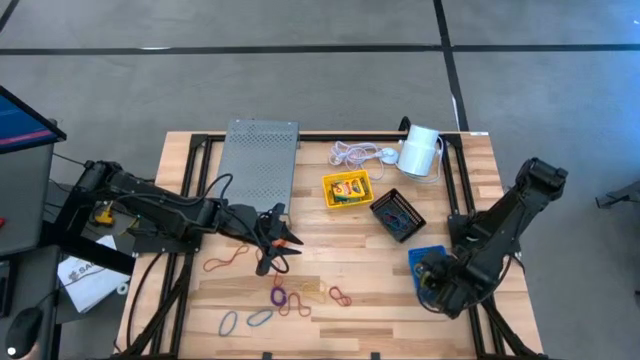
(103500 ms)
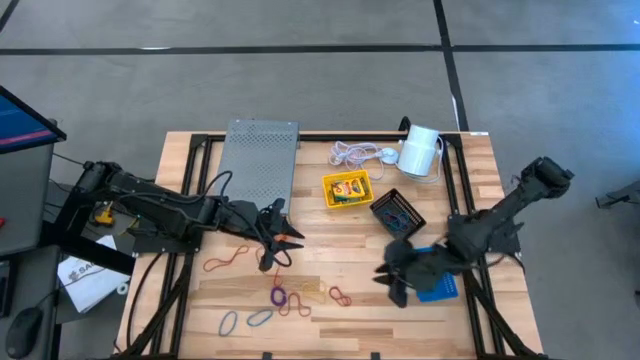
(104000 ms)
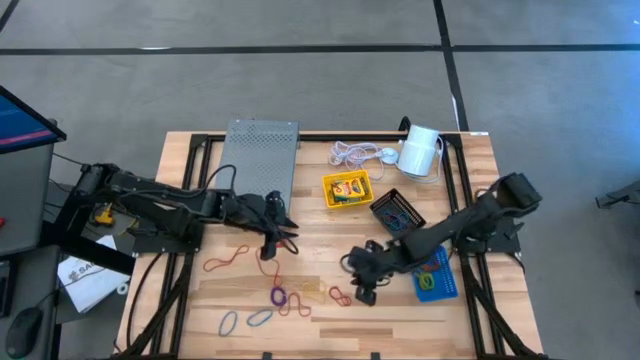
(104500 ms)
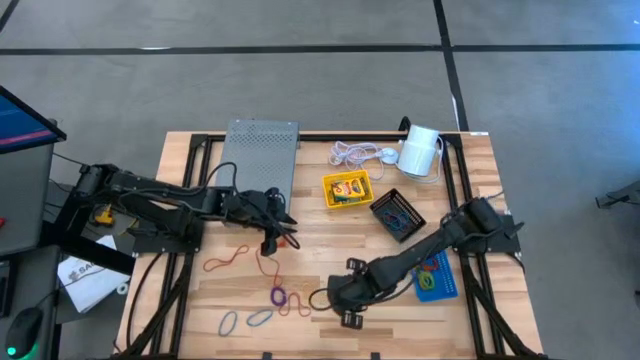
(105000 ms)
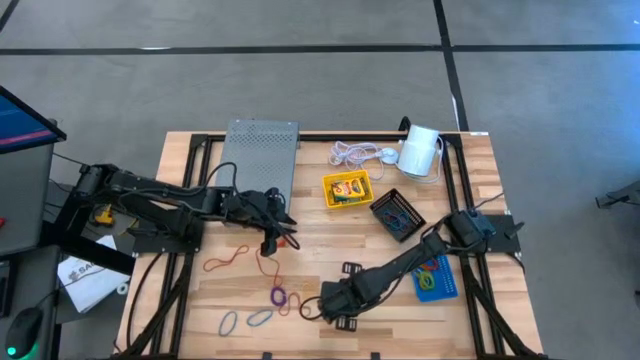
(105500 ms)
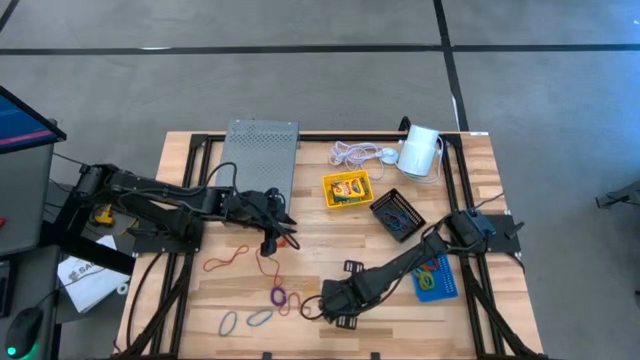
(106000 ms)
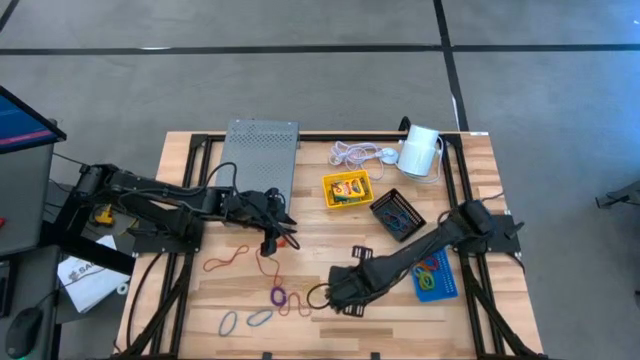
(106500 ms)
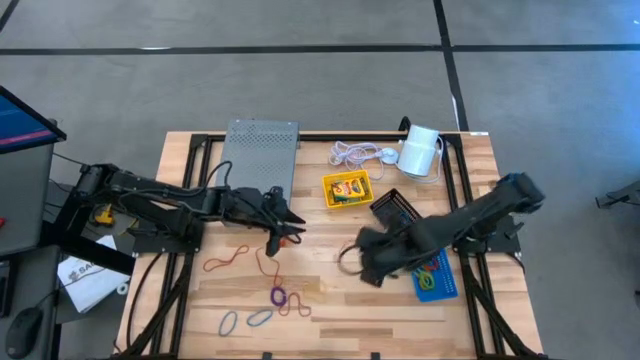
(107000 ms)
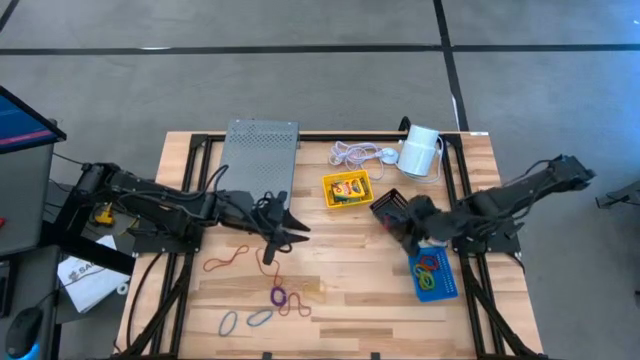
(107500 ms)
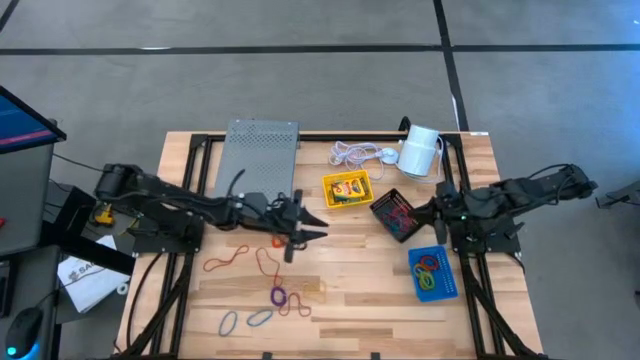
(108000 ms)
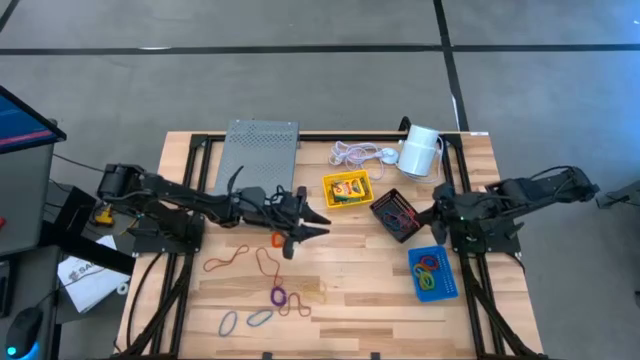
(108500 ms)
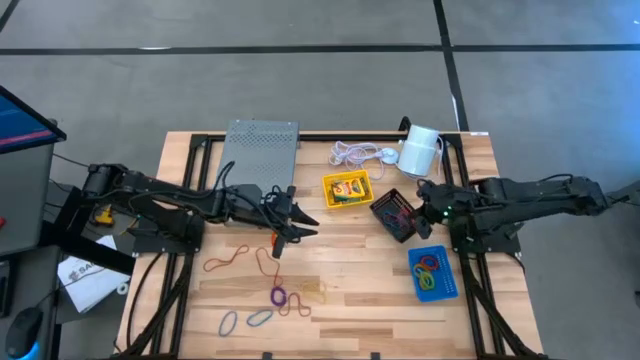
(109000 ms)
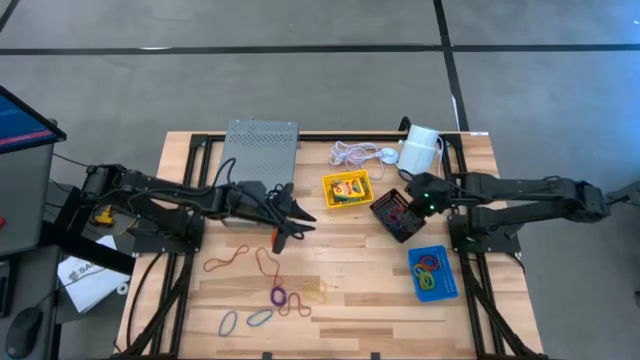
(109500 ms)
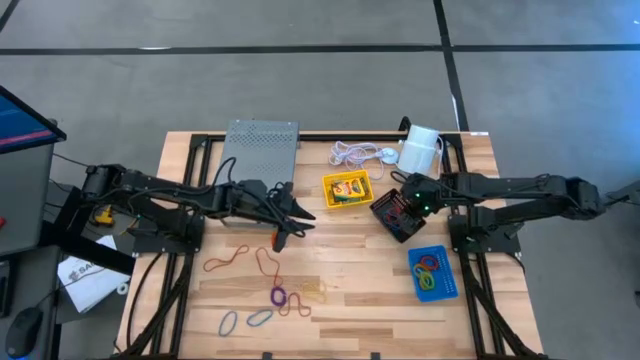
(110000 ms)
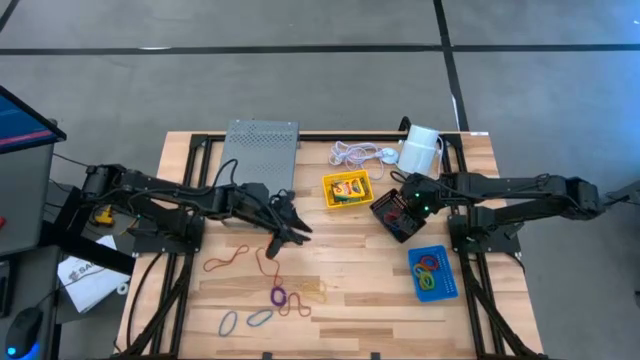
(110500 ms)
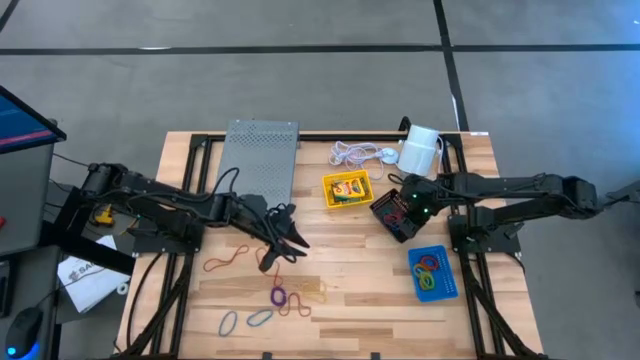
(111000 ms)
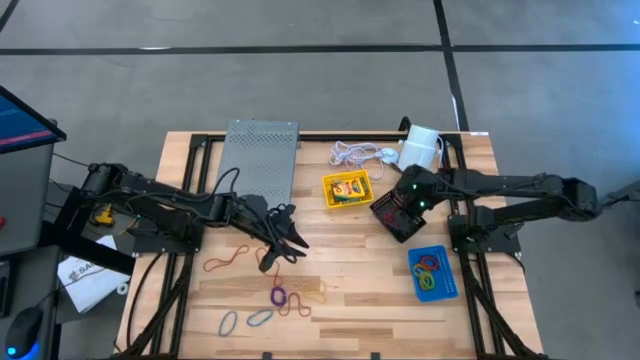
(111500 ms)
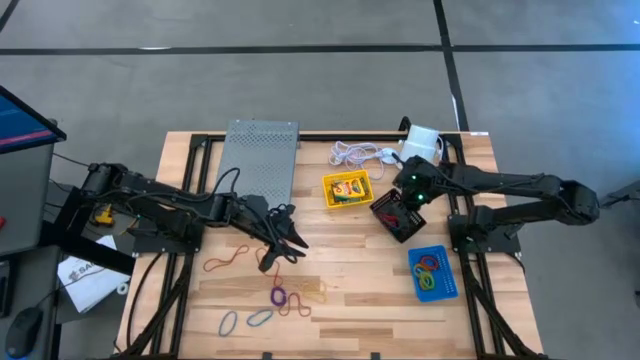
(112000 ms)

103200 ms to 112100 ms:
Task: Pick & Place Office Desk Supplies
Put the red rubber band into the black bin

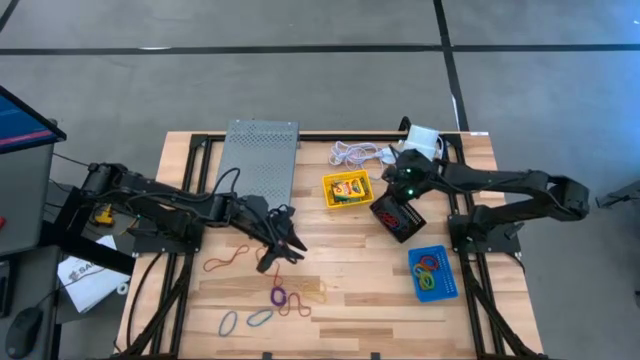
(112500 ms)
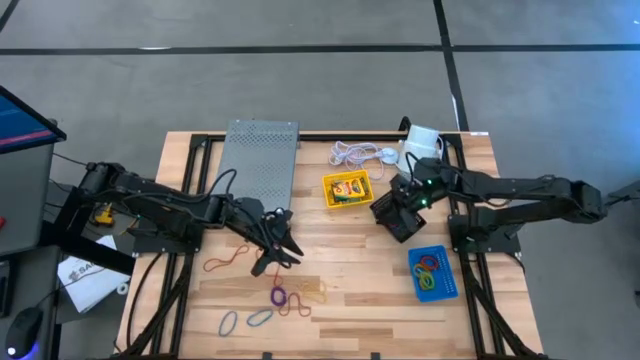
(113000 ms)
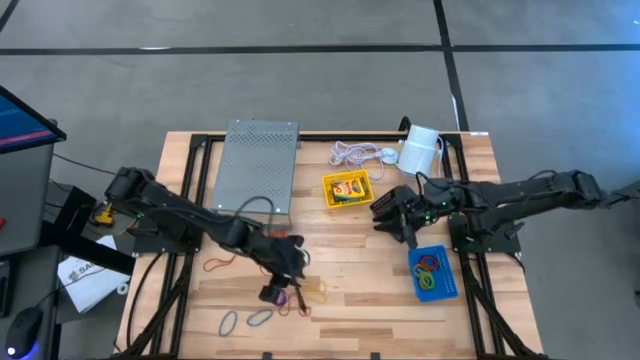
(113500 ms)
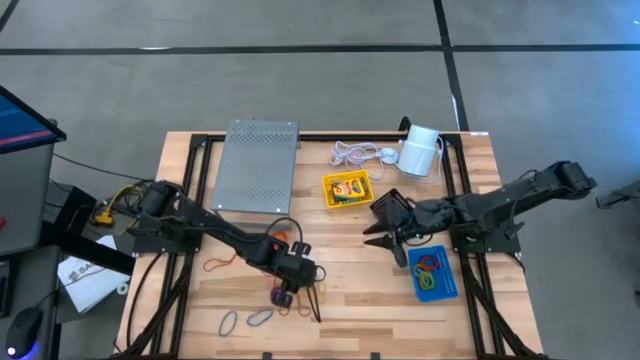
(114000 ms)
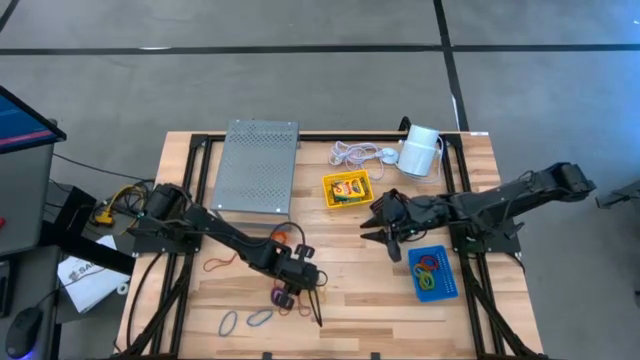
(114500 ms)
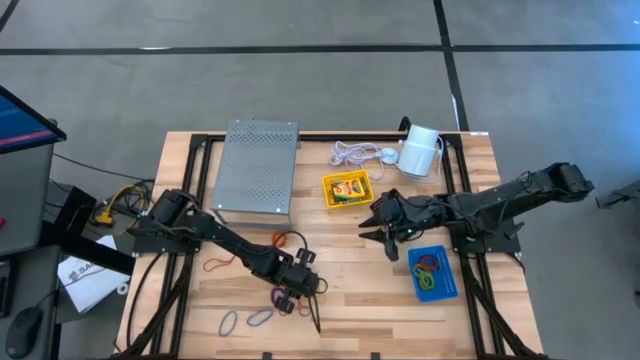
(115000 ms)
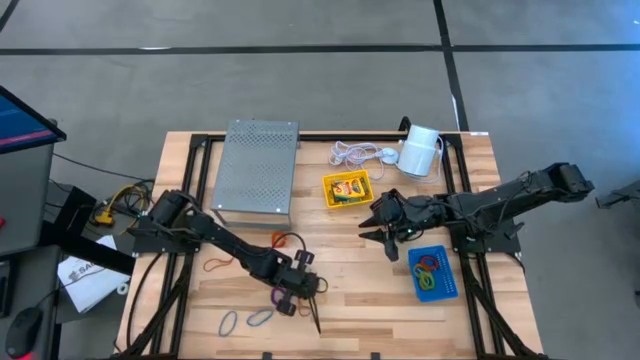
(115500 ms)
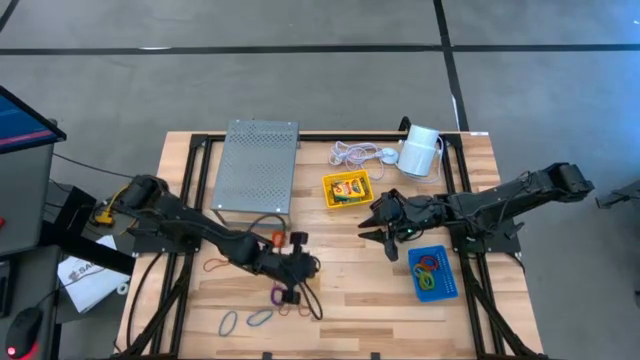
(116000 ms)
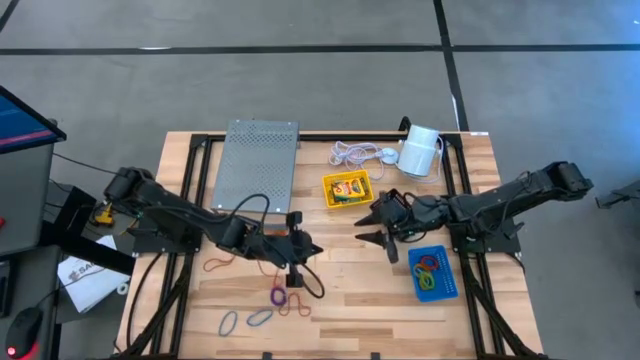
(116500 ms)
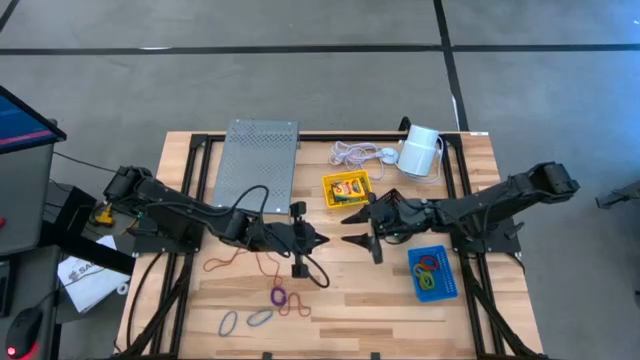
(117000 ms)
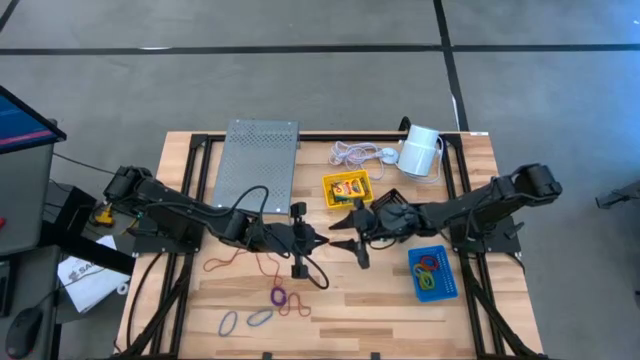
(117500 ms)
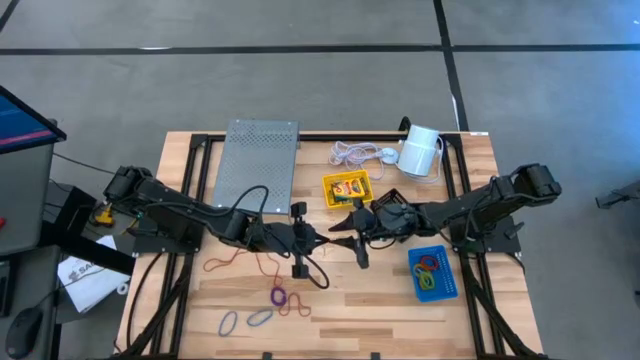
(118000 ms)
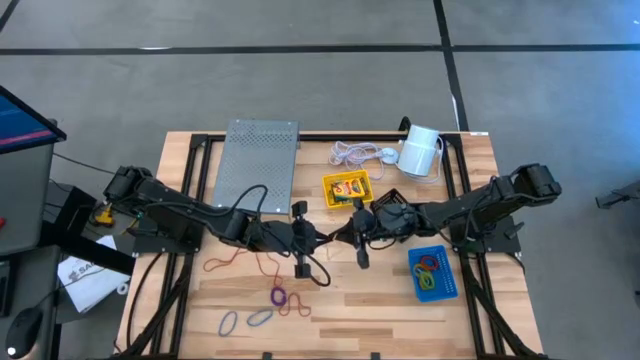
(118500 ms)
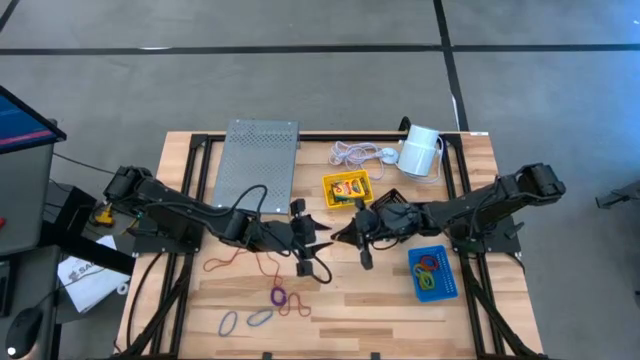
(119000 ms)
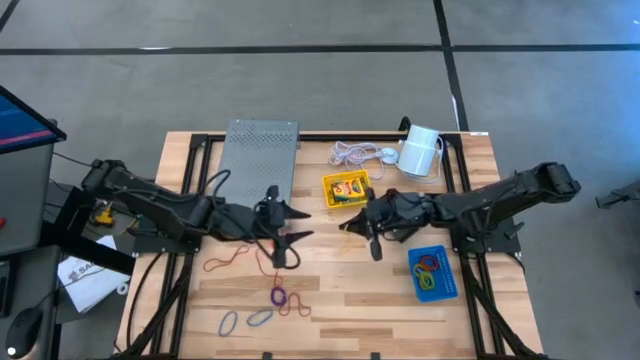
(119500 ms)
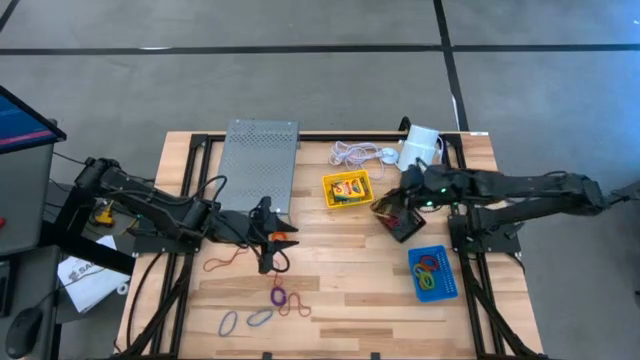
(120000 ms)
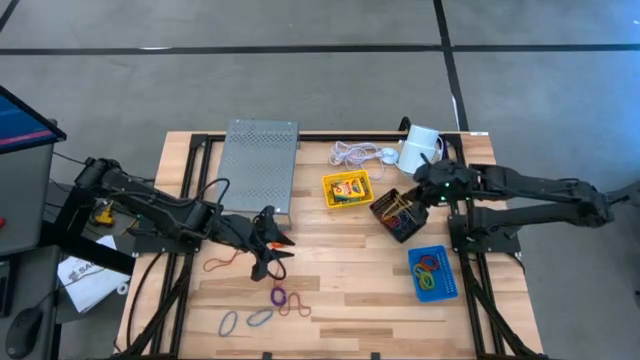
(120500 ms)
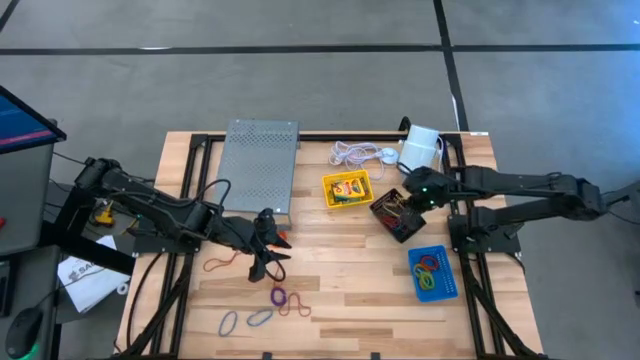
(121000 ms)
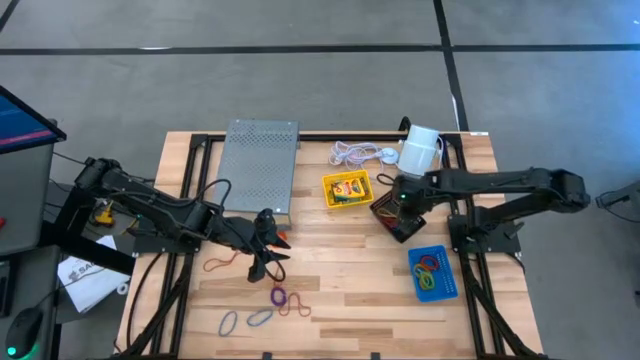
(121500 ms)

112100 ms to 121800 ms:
Put the yellow rubber band into the black bin
